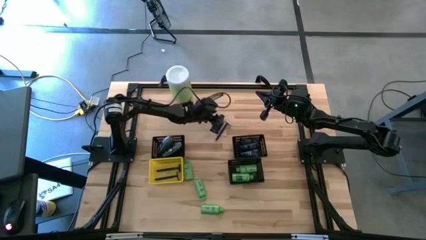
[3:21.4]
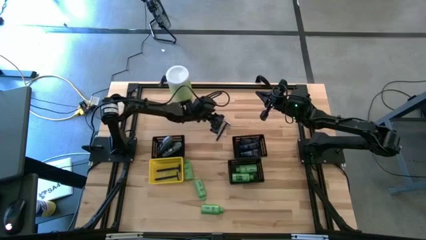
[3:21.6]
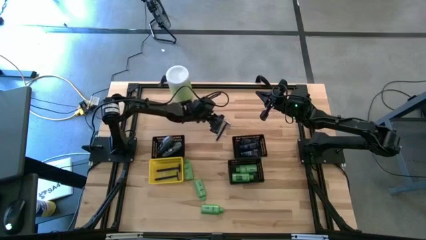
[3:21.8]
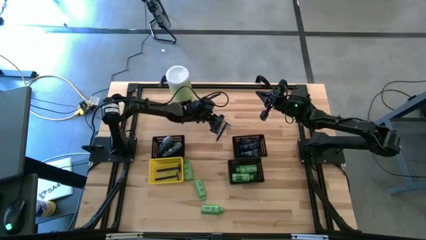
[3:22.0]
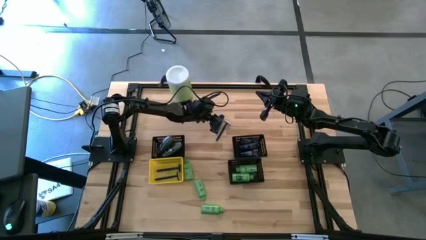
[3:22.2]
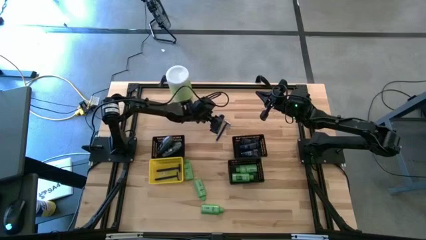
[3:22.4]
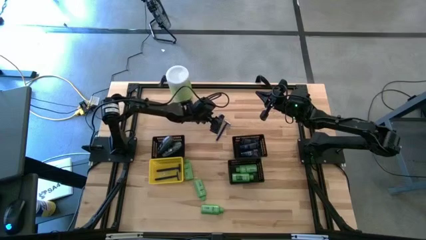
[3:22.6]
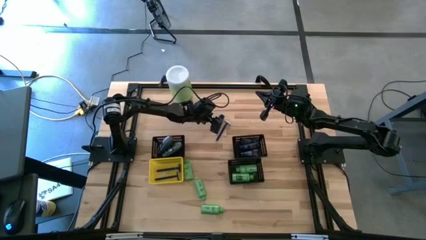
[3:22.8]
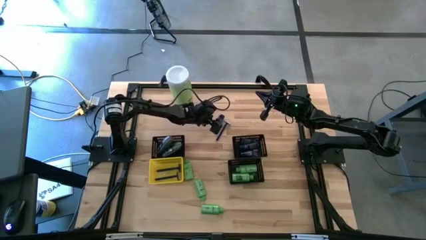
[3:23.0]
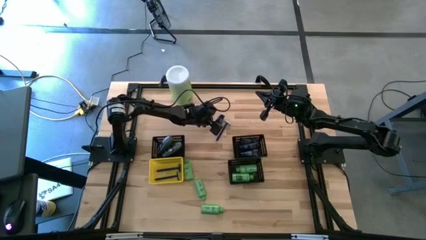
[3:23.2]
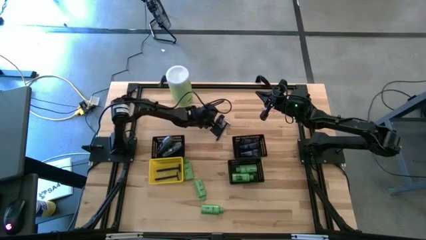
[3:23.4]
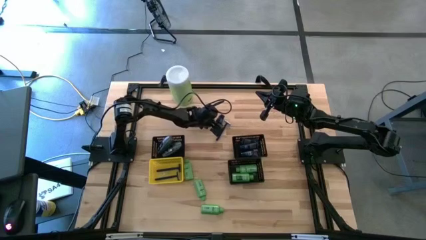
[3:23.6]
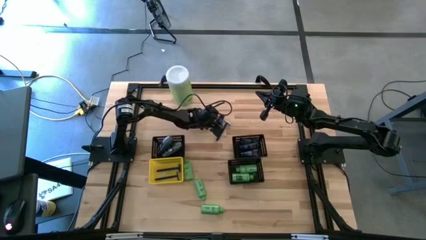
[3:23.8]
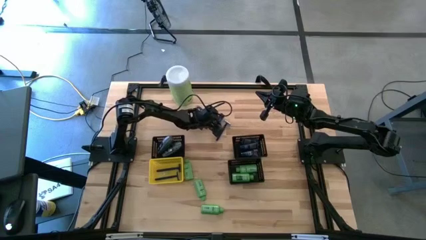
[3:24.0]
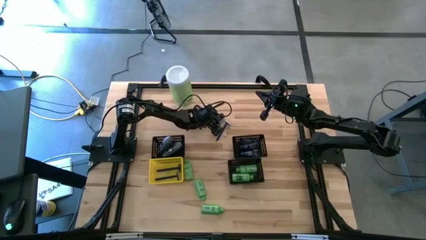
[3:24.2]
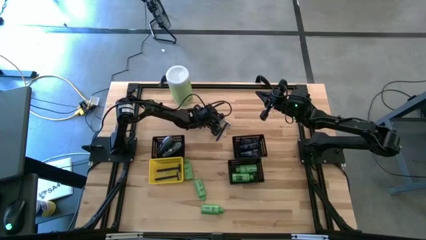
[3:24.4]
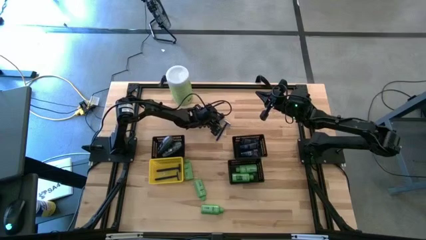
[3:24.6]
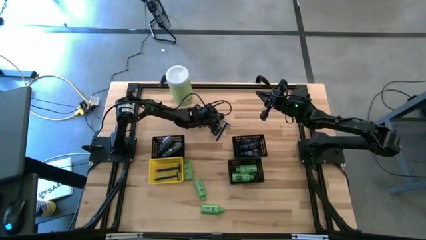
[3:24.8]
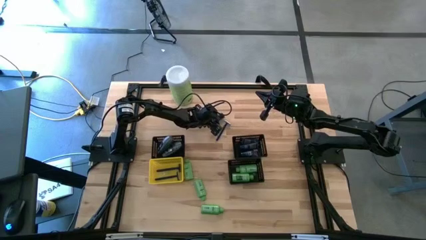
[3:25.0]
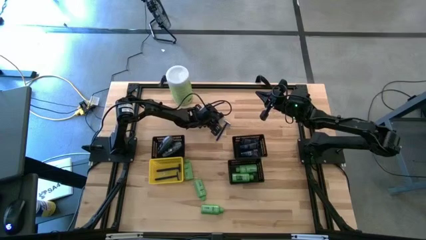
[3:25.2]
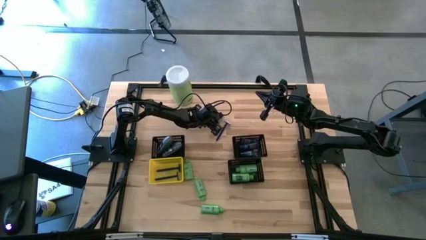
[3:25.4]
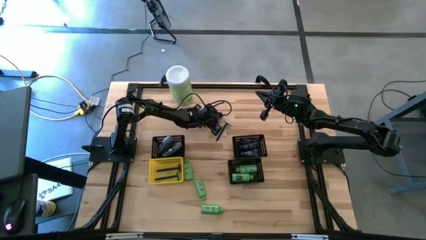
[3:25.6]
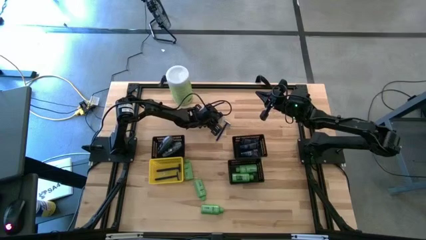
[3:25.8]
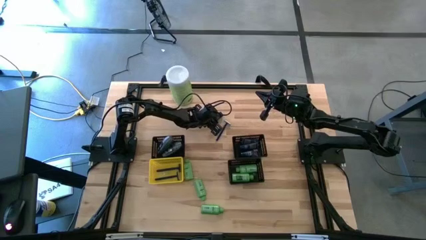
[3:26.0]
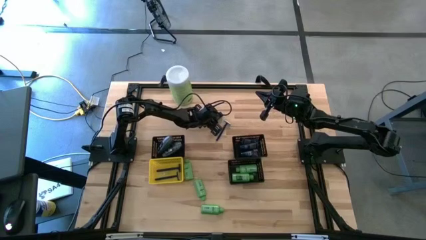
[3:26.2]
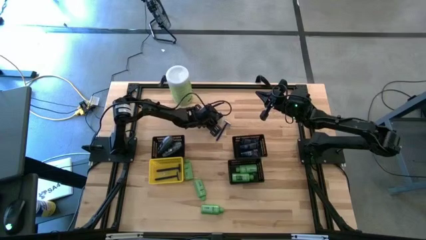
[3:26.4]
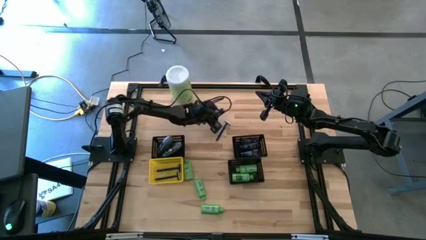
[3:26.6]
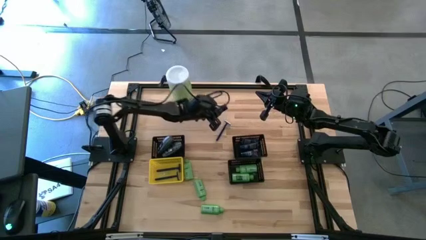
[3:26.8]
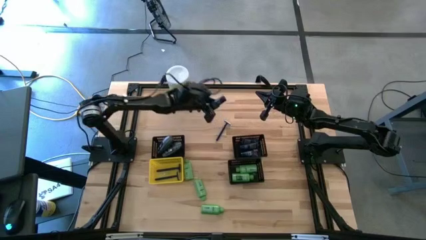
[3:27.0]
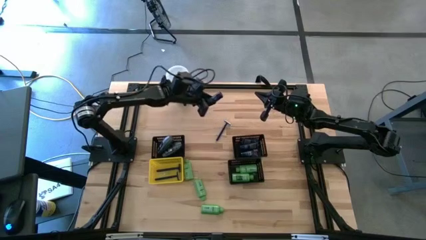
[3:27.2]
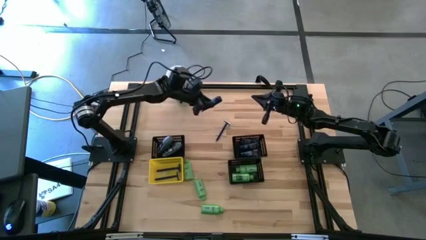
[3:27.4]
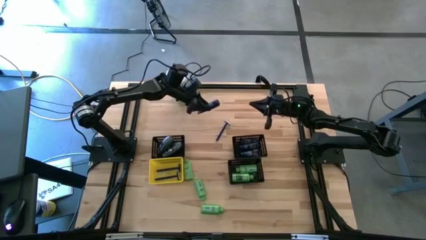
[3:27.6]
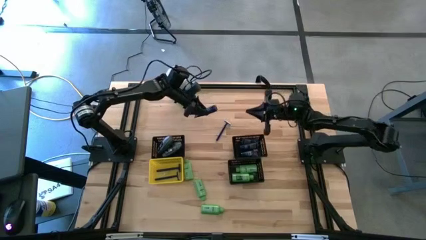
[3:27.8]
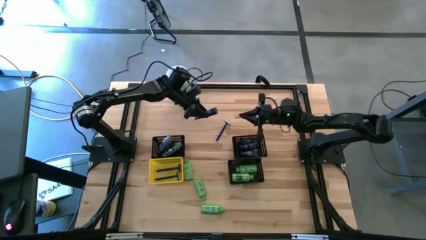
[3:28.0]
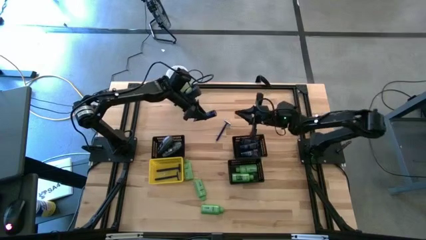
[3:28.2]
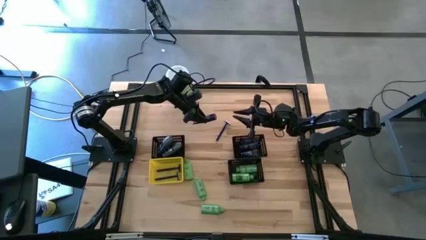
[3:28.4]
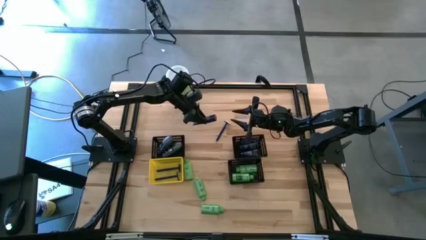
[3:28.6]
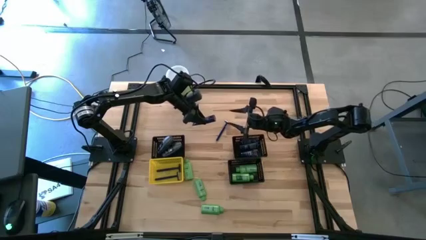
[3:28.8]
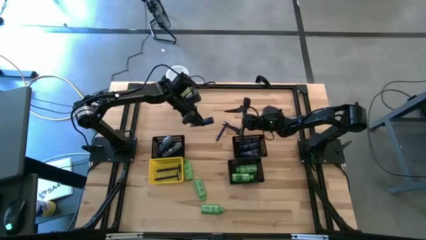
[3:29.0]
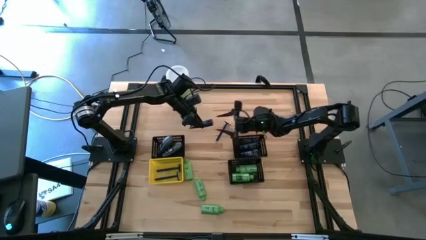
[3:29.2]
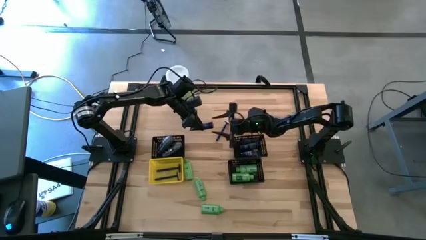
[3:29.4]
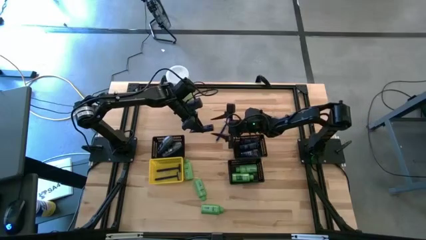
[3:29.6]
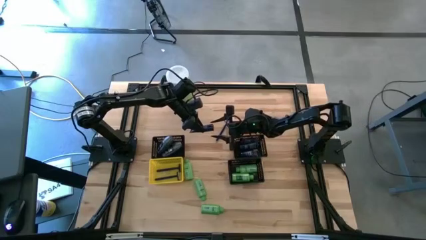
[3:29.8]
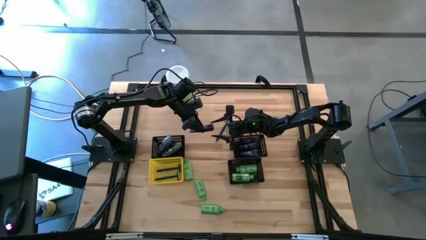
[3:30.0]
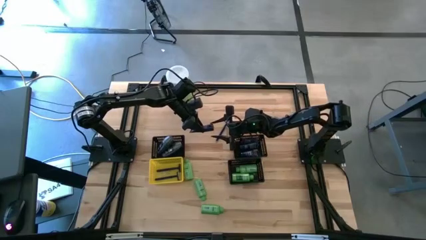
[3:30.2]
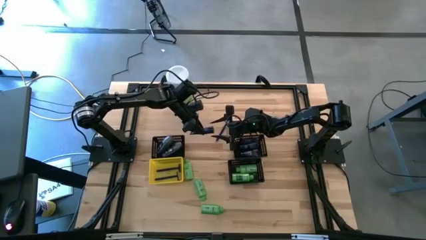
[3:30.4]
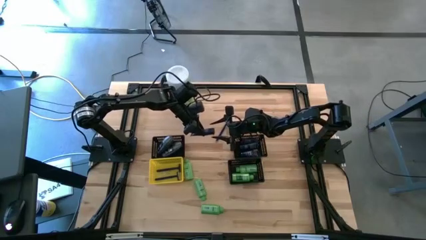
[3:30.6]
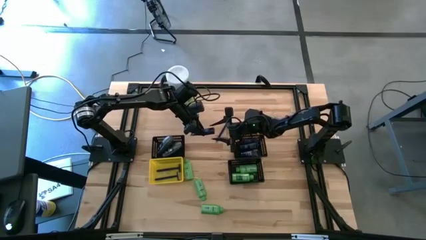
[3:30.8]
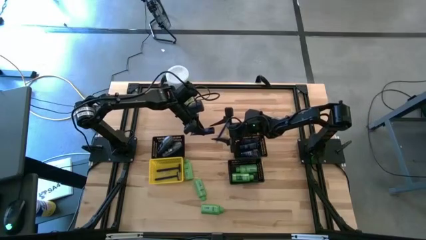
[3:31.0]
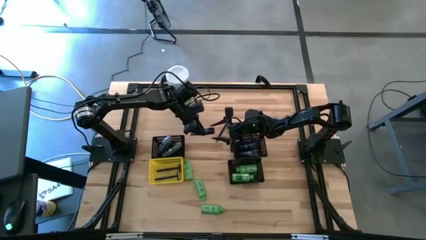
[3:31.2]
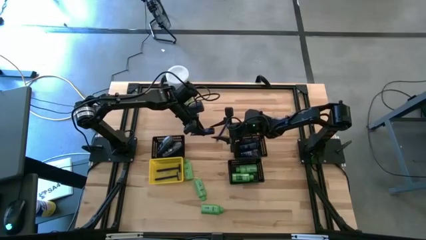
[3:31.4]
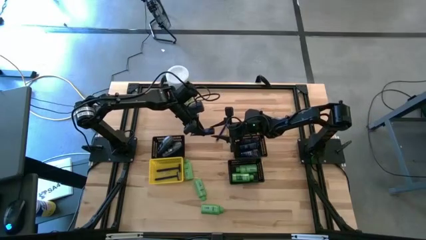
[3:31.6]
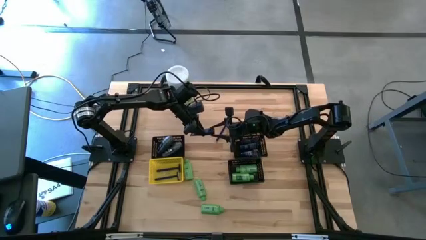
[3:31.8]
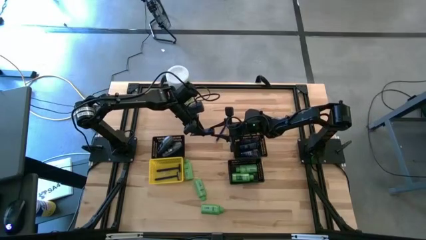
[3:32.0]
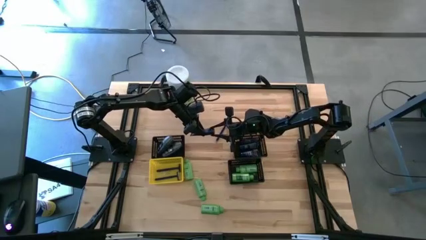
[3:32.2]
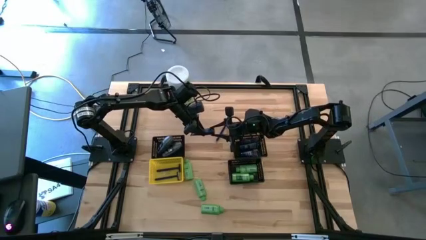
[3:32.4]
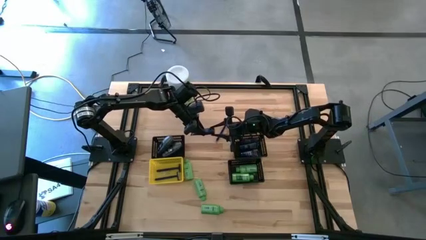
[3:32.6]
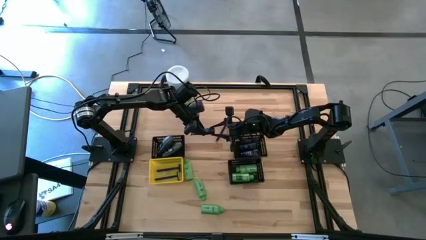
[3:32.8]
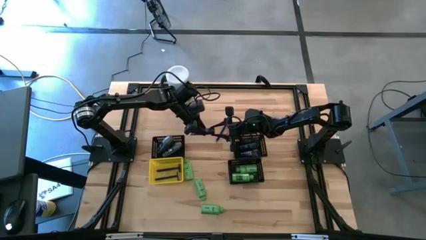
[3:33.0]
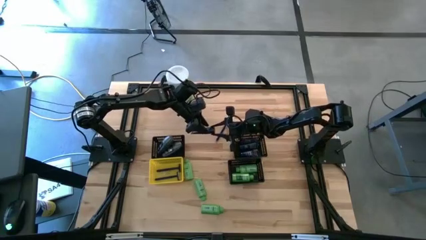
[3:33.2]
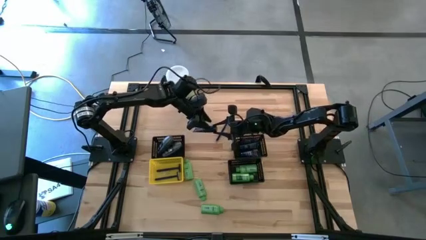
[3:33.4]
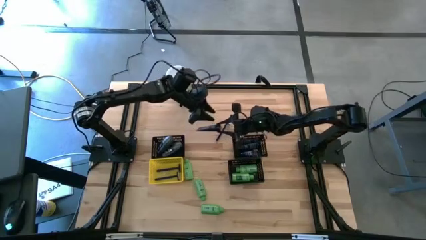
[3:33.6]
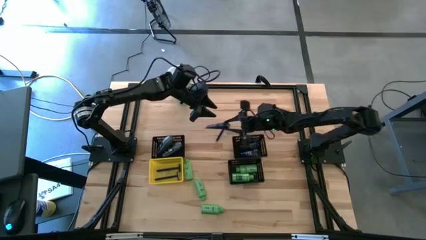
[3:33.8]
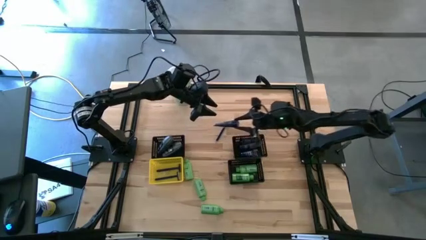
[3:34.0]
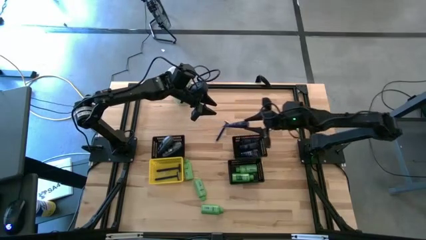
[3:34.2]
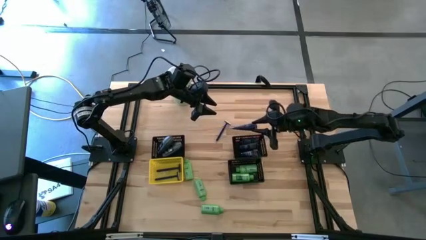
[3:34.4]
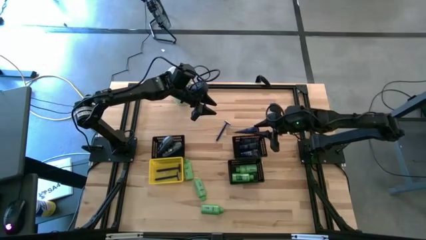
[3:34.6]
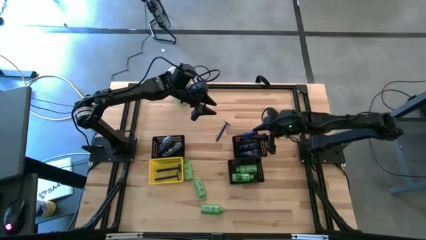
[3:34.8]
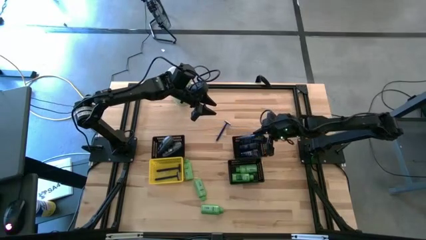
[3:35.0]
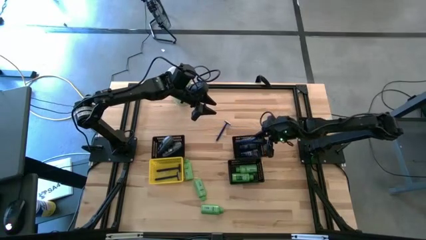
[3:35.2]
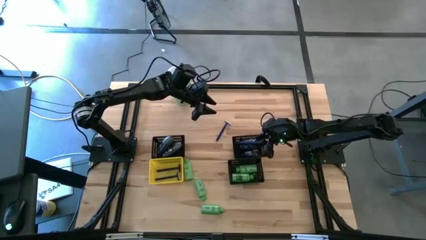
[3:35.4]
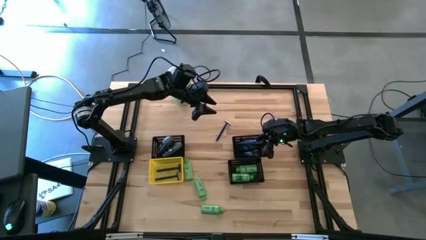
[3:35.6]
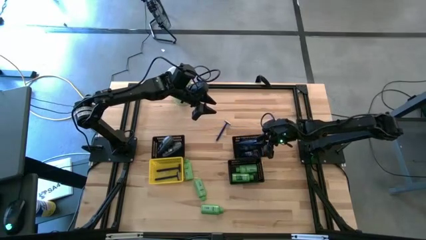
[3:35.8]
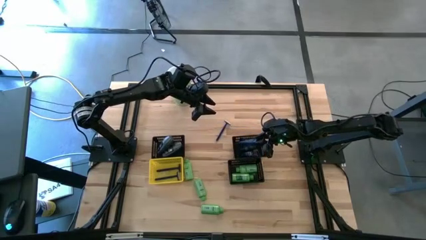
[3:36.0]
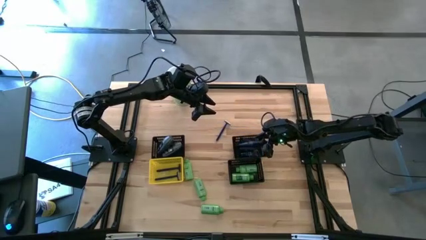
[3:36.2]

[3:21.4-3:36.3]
Task: Pick & Place Travel size toiletries
Put the blue shave cream tub into the top right black bin
